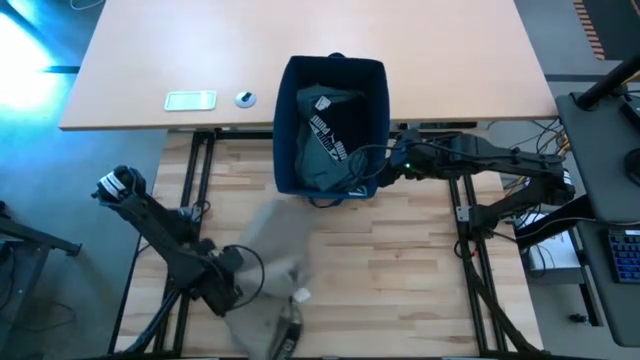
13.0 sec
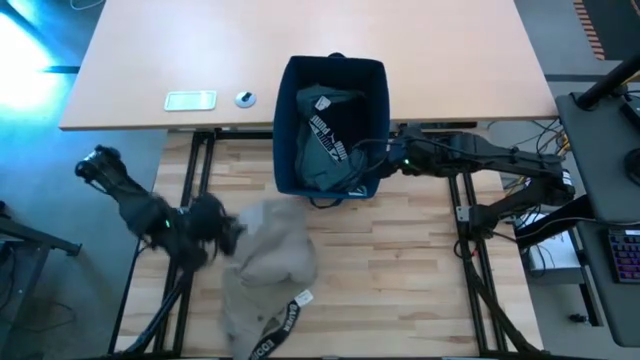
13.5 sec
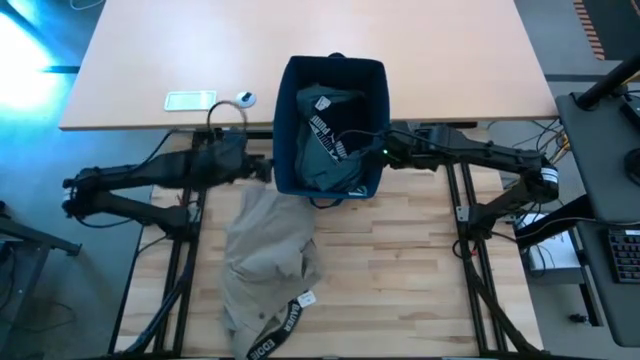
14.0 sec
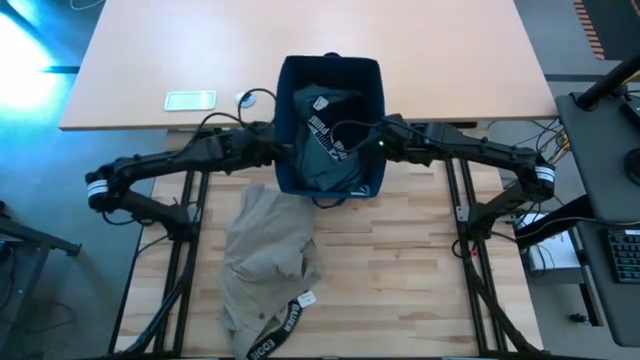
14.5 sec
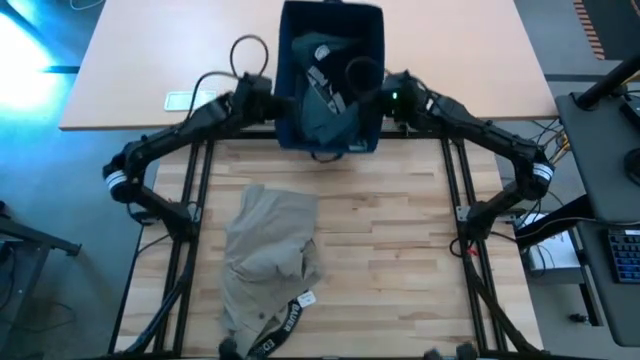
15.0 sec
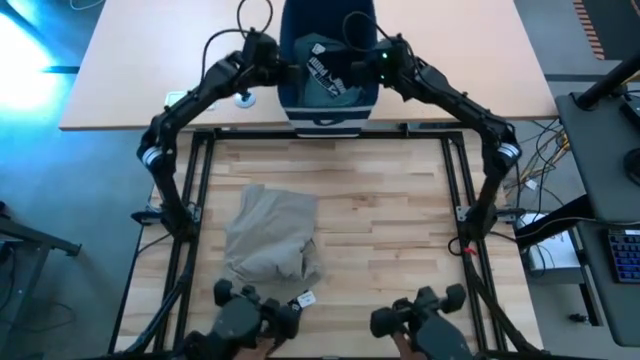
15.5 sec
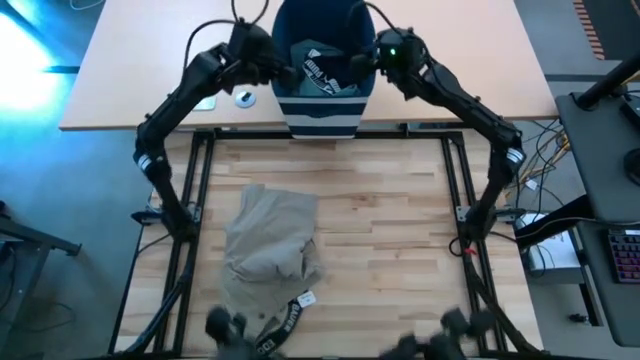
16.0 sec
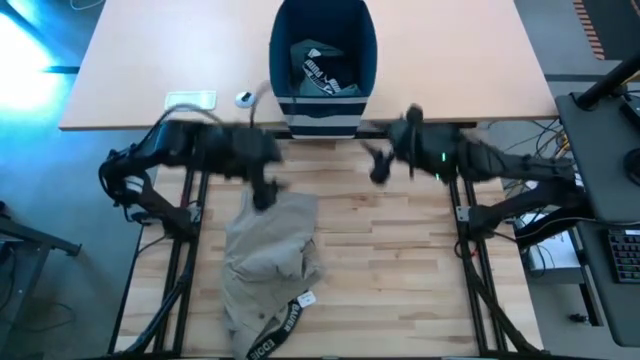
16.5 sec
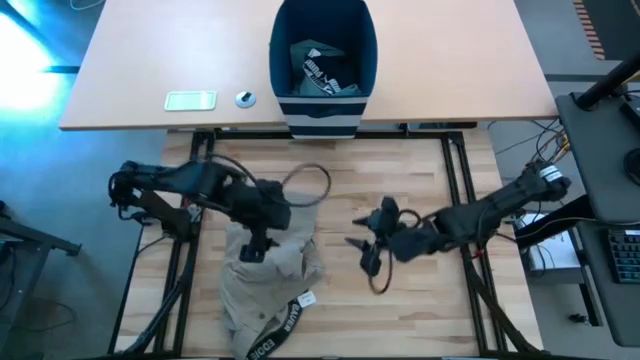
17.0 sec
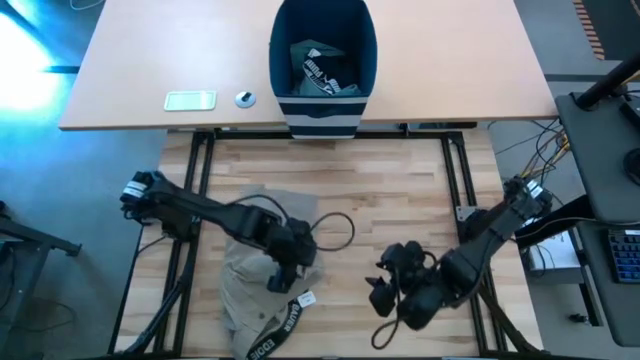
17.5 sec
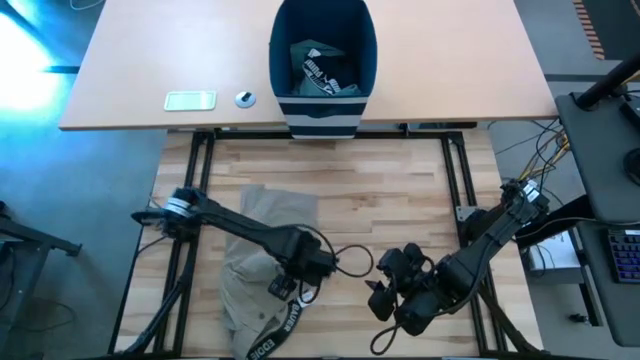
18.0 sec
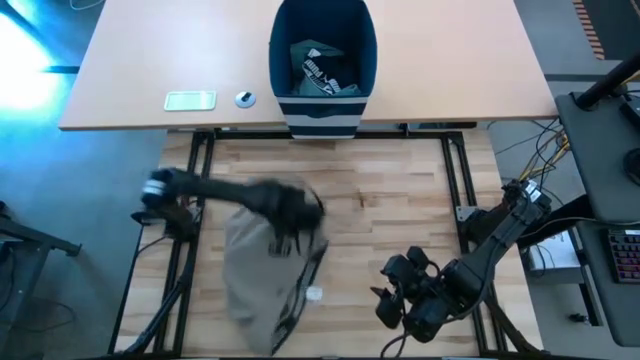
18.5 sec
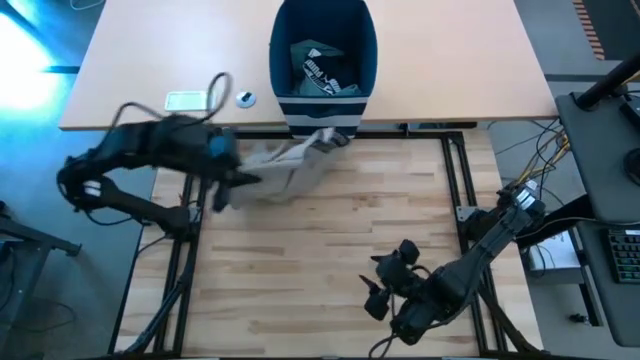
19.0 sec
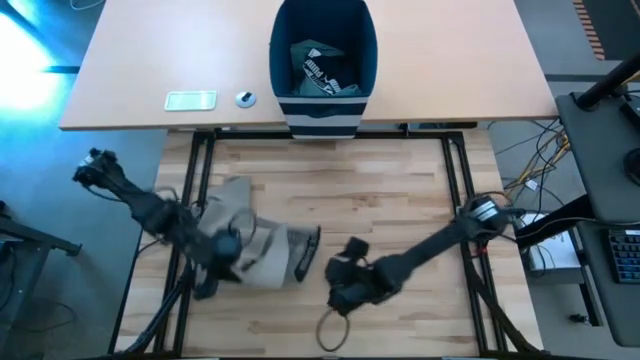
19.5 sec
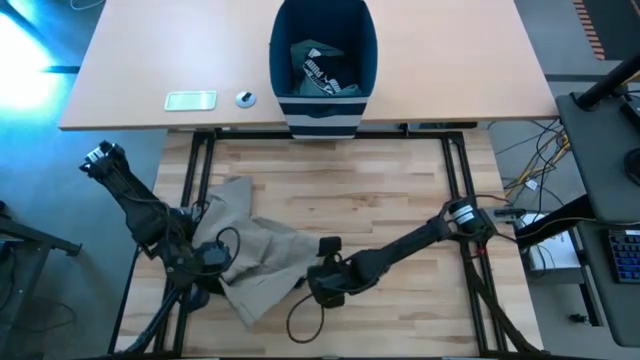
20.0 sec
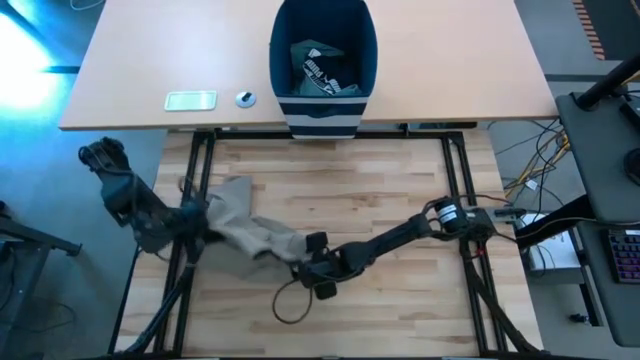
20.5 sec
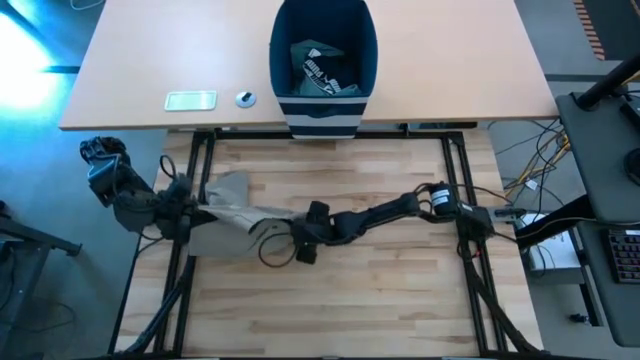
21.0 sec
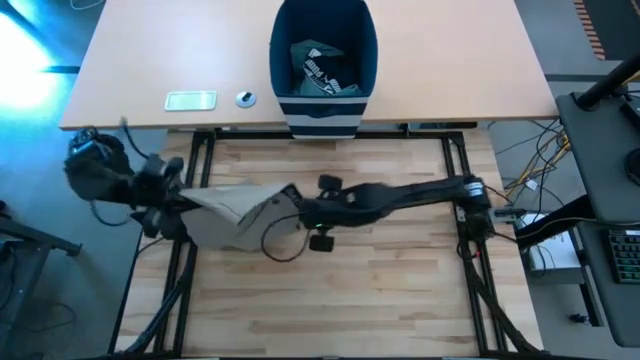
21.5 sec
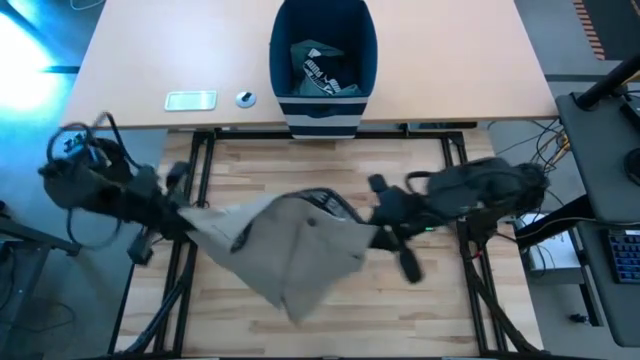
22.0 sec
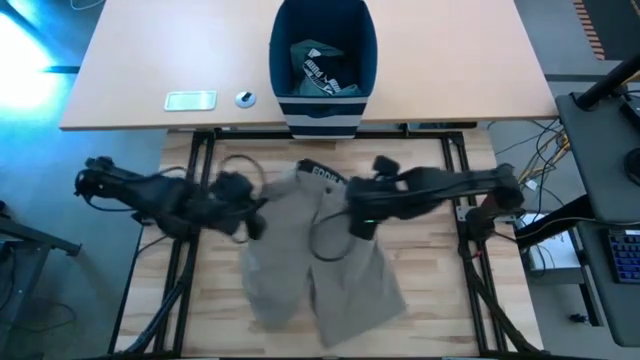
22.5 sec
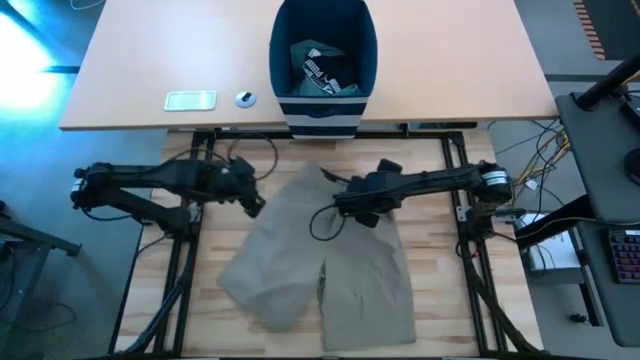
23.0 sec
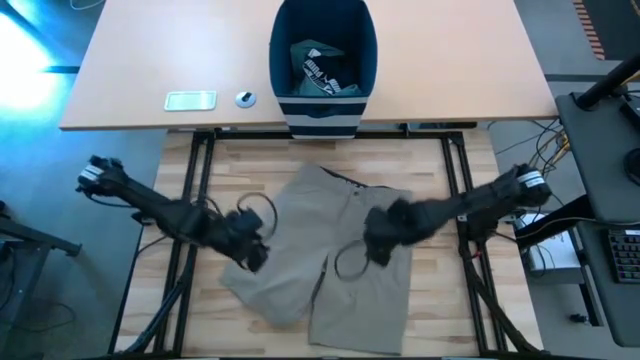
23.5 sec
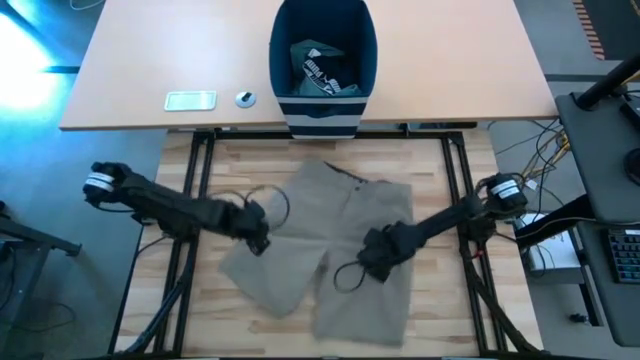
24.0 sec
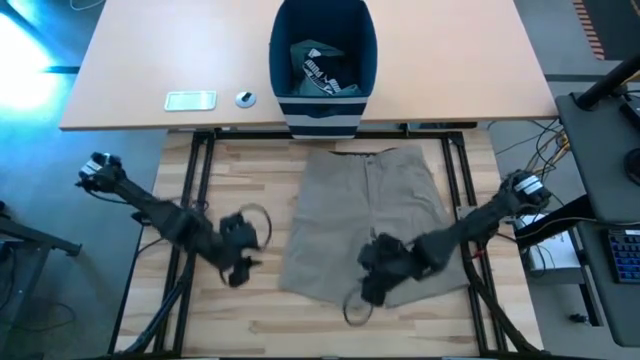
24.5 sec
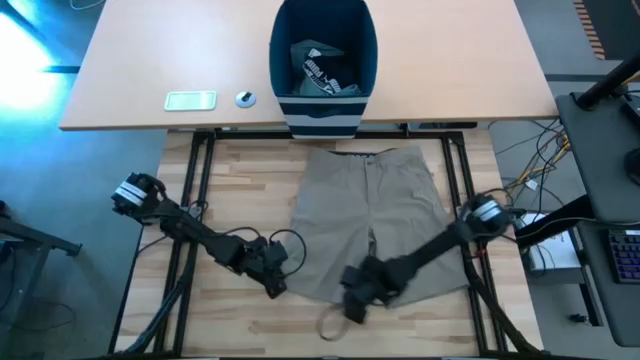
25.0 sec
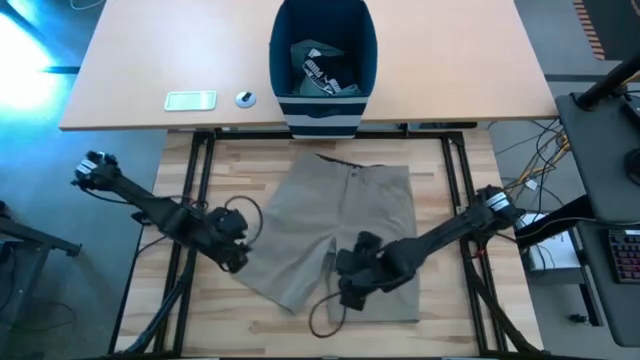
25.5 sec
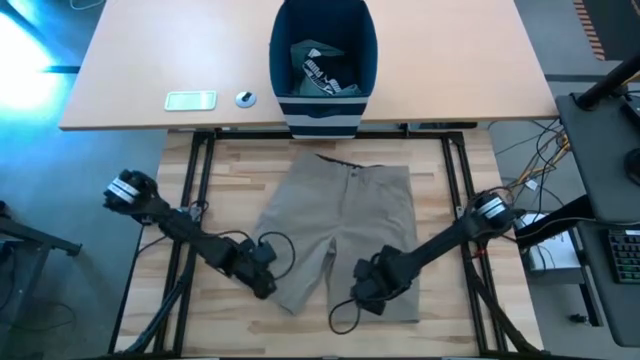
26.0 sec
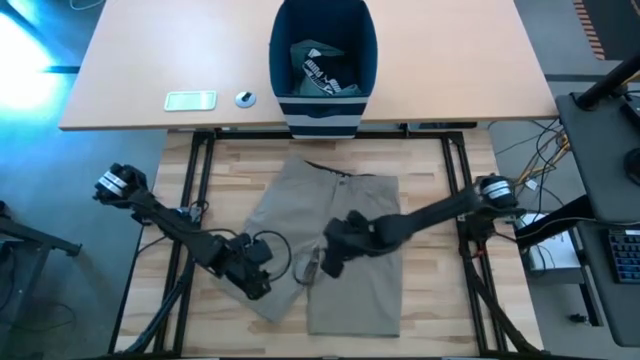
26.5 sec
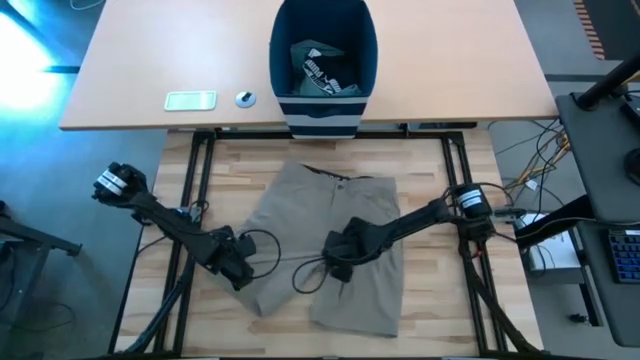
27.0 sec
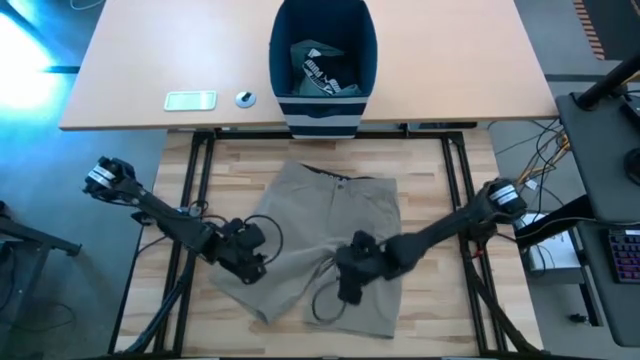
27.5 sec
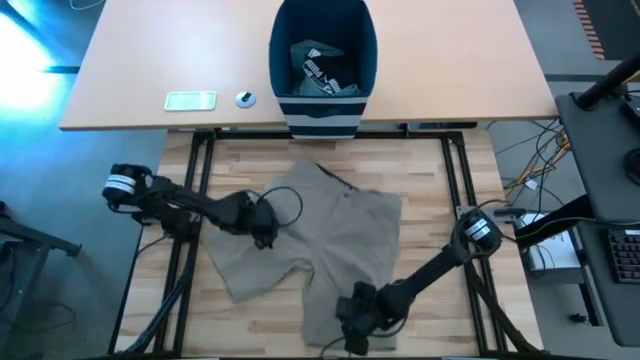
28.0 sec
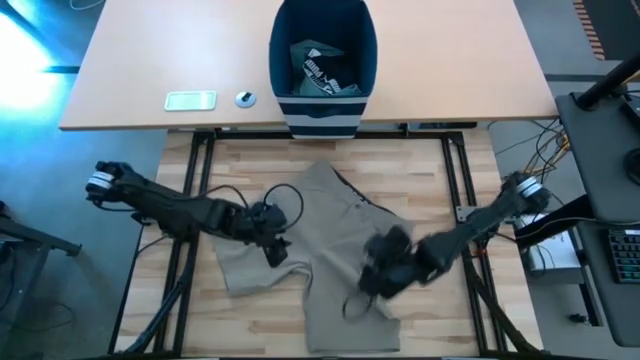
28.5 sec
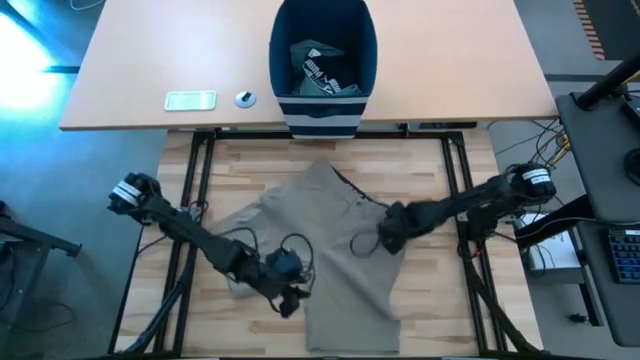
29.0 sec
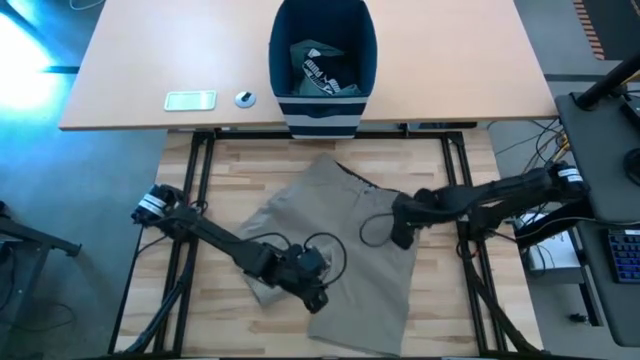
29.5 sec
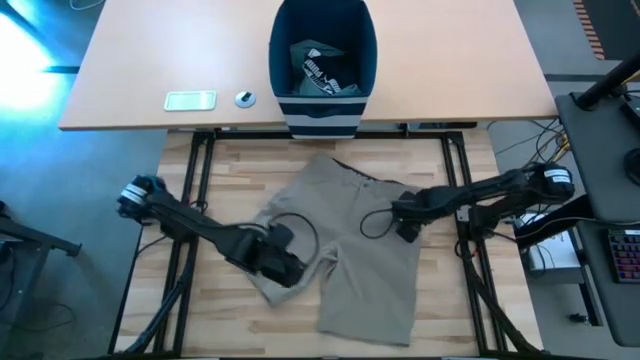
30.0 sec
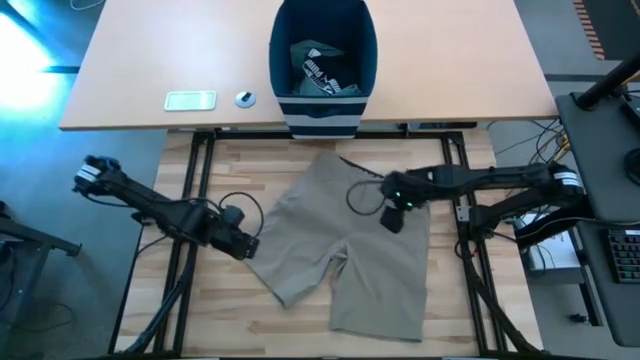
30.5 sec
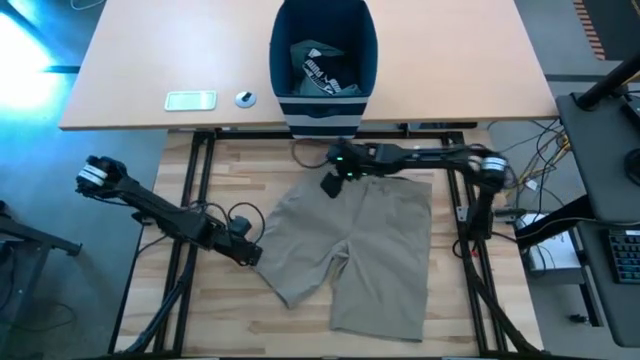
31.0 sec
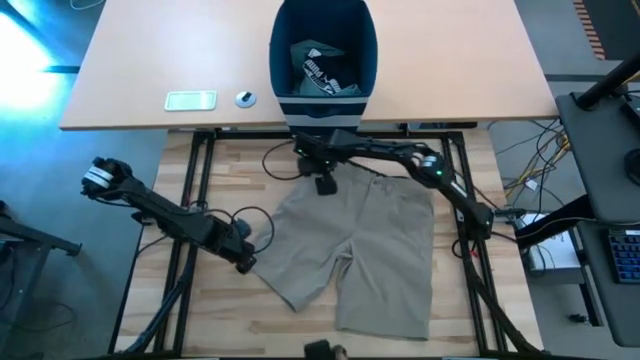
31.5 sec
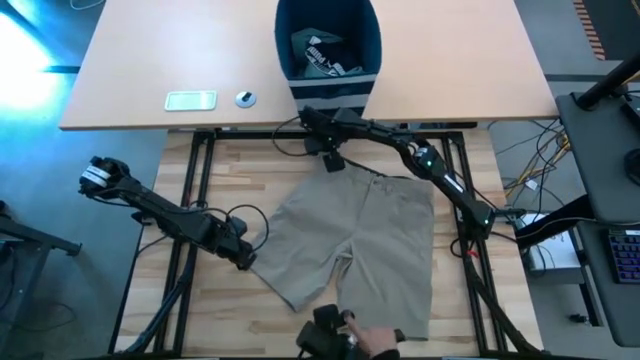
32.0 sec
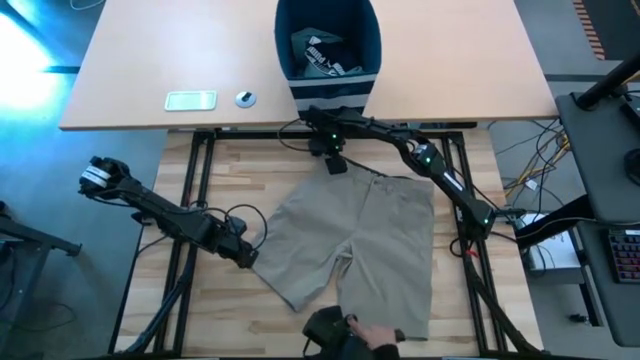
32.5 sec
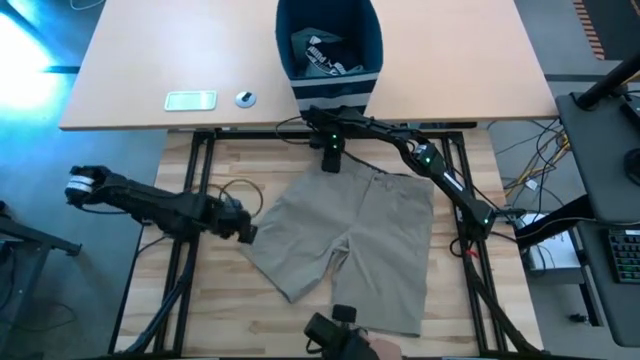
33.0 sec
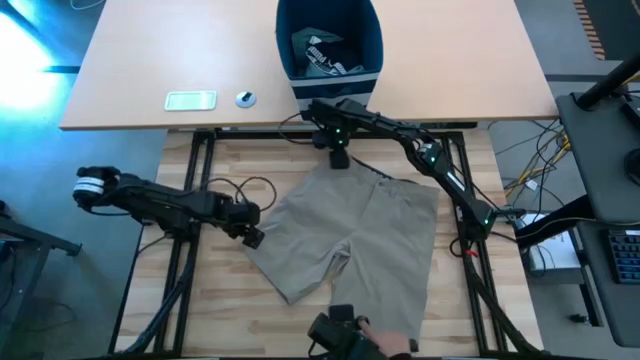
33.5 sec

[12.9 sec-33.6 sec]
Task: Fold Laundry from Bin
Fold the brown shorts

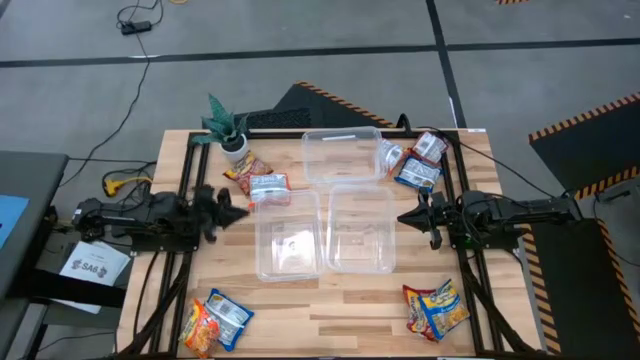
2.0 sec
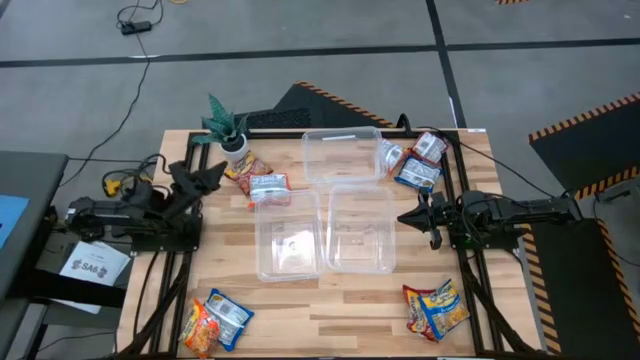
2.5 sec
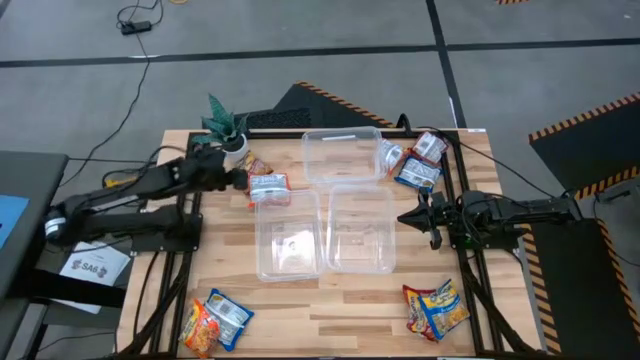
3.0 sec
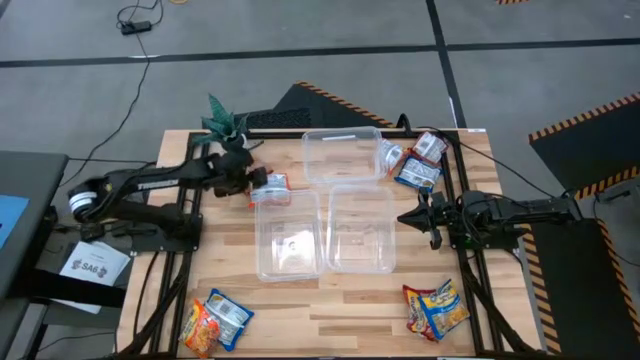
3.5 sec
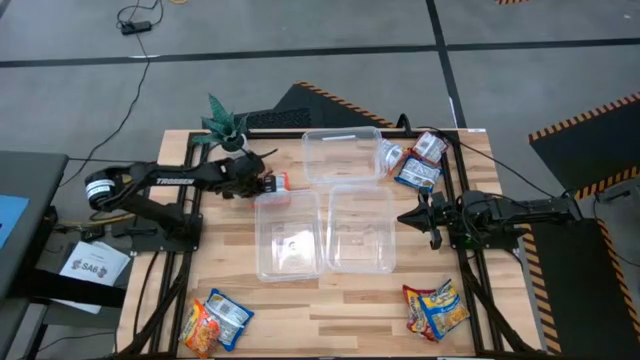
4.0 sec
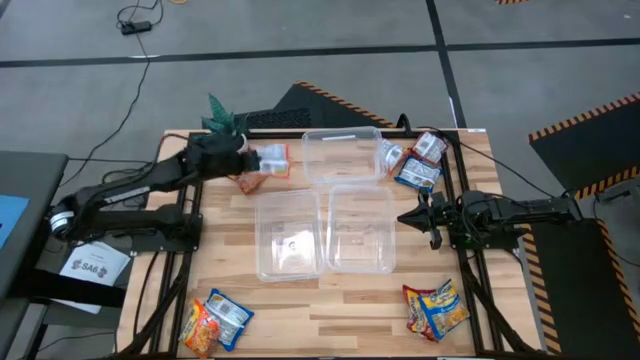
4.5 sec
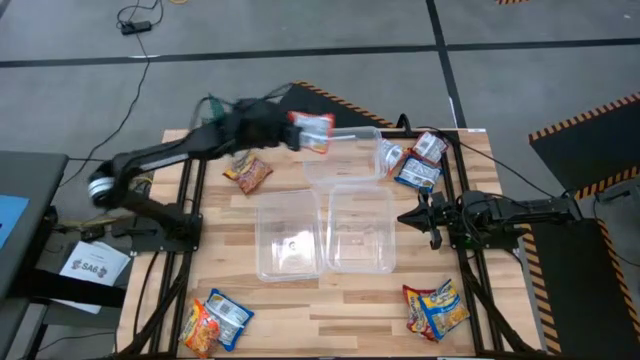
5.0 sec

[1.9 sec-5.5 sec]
Task: Sort Maruchan noodles
Put the top left orange noodle pack into the top transparent bin
